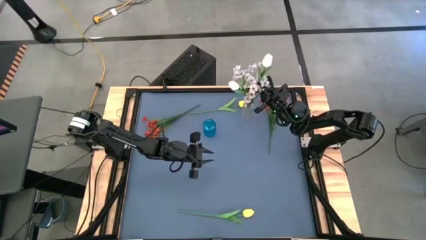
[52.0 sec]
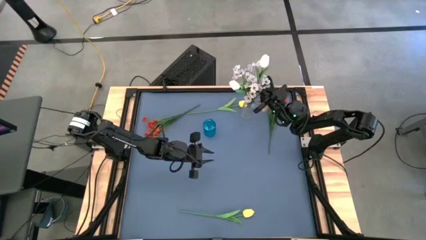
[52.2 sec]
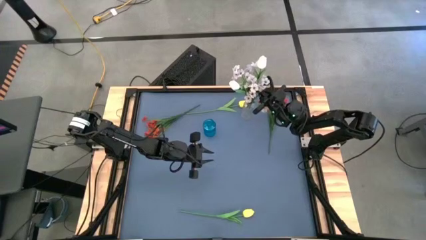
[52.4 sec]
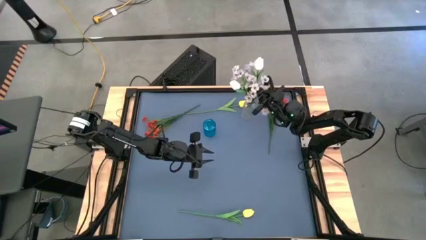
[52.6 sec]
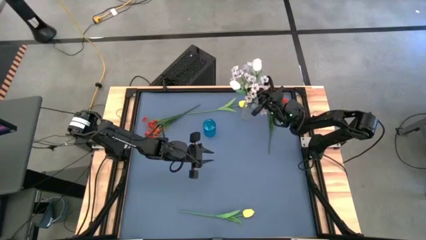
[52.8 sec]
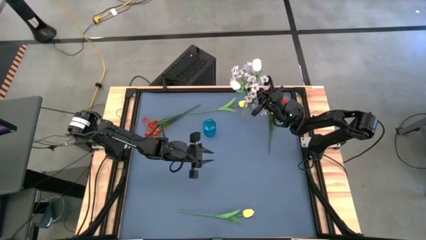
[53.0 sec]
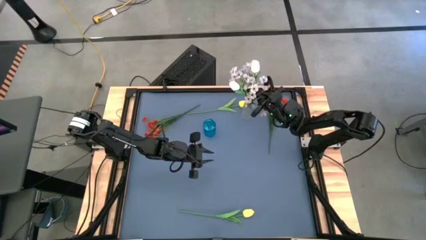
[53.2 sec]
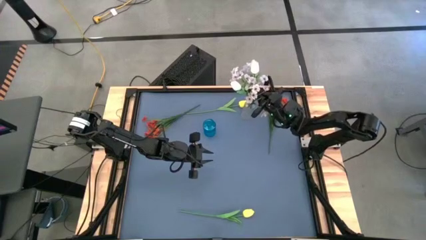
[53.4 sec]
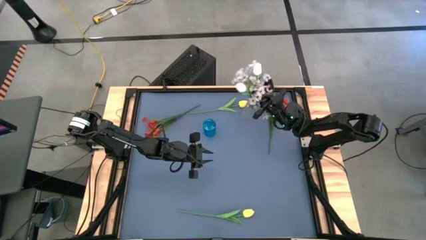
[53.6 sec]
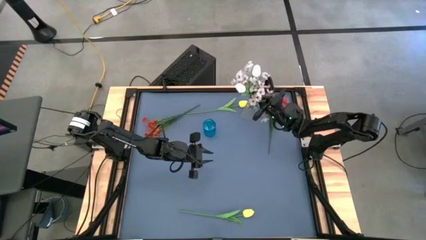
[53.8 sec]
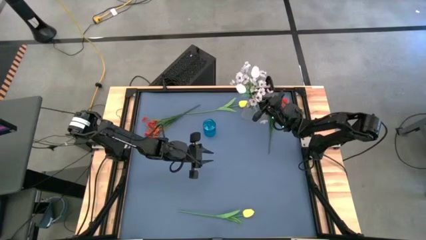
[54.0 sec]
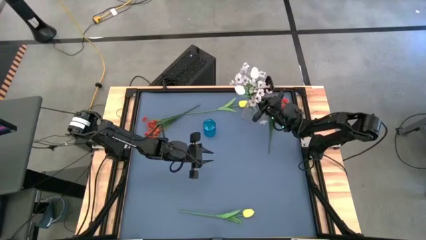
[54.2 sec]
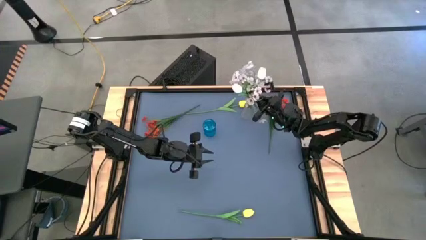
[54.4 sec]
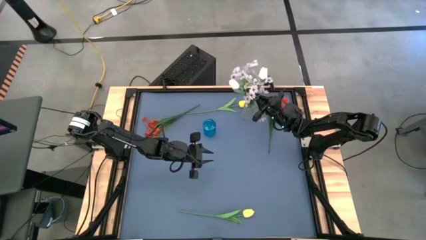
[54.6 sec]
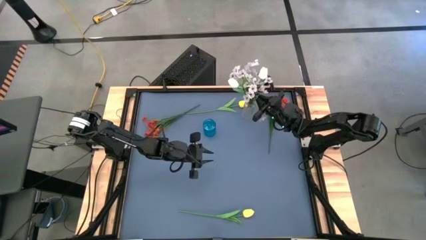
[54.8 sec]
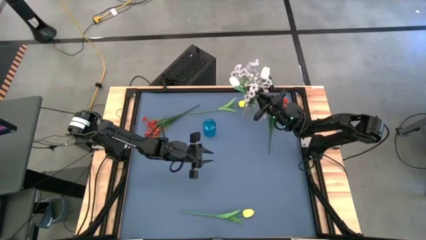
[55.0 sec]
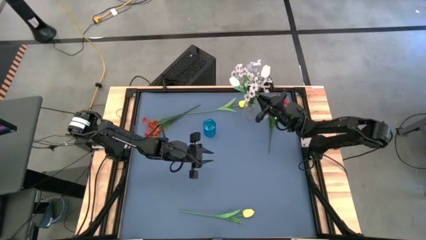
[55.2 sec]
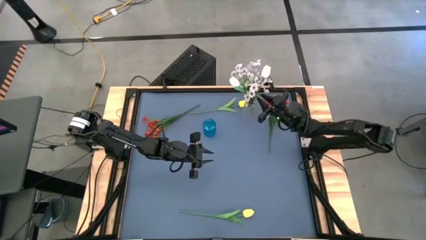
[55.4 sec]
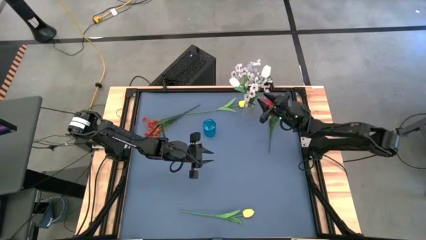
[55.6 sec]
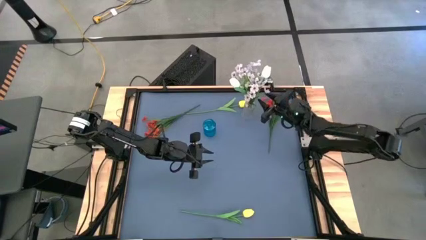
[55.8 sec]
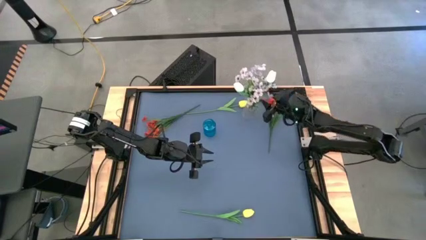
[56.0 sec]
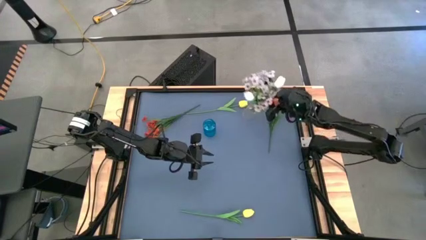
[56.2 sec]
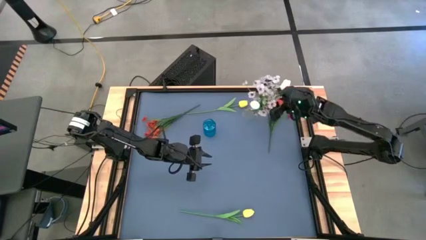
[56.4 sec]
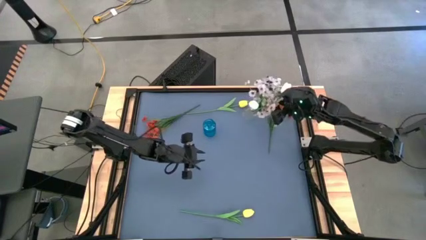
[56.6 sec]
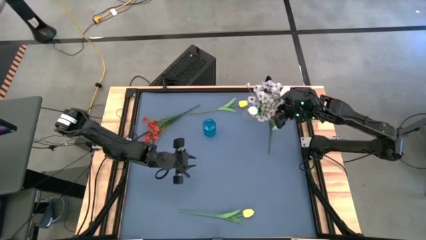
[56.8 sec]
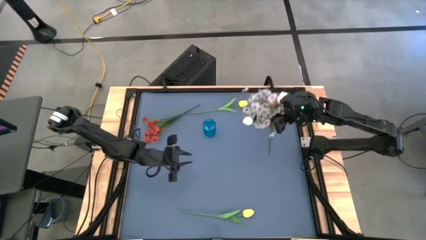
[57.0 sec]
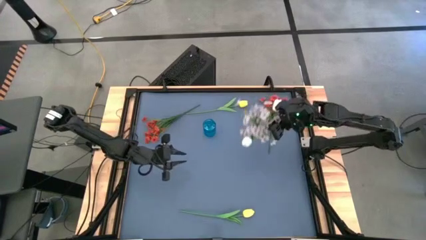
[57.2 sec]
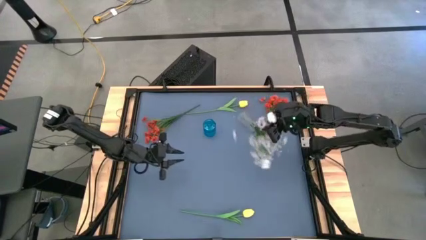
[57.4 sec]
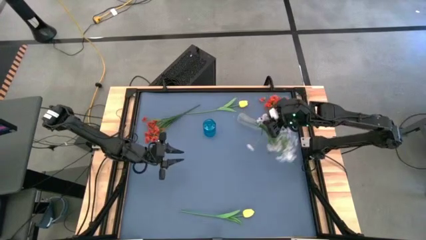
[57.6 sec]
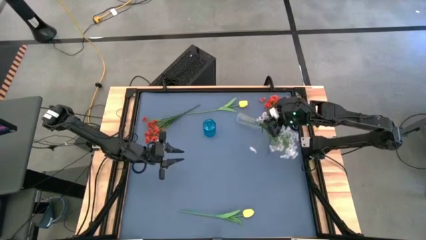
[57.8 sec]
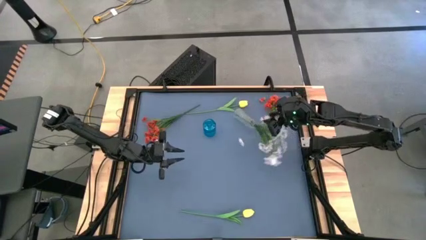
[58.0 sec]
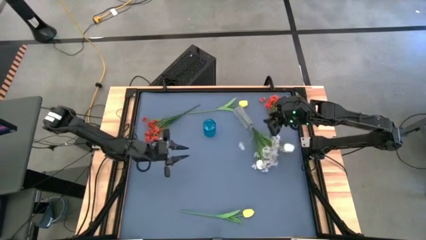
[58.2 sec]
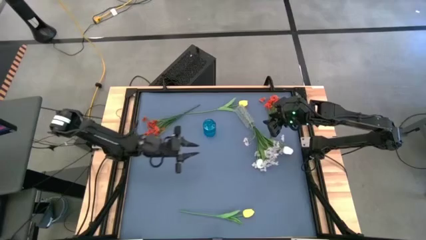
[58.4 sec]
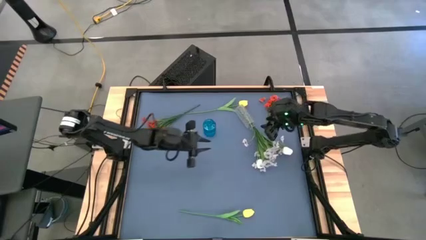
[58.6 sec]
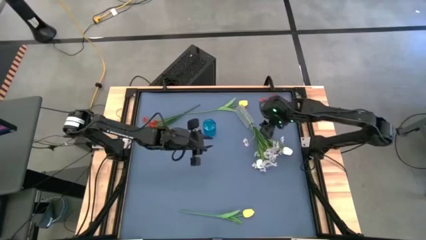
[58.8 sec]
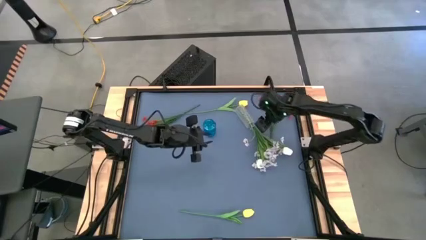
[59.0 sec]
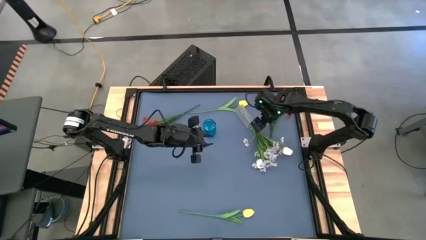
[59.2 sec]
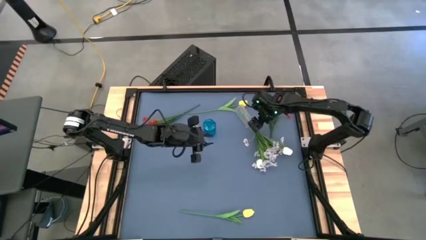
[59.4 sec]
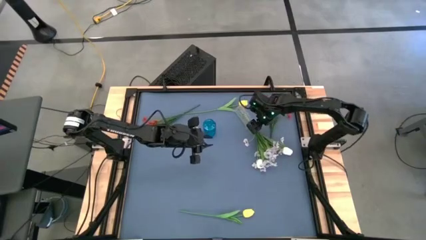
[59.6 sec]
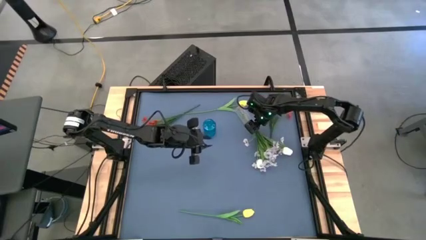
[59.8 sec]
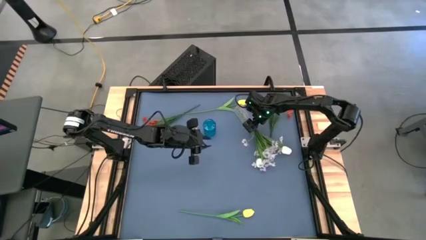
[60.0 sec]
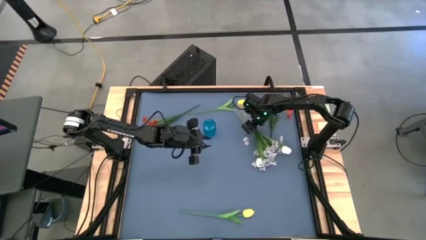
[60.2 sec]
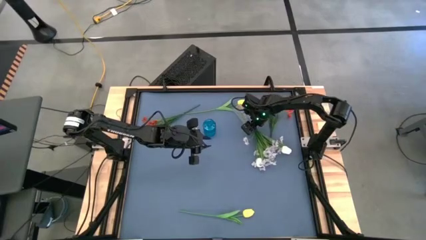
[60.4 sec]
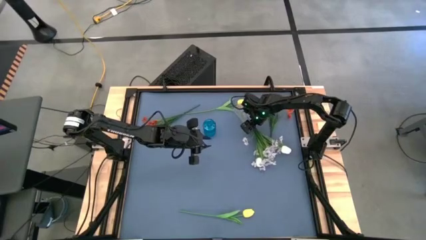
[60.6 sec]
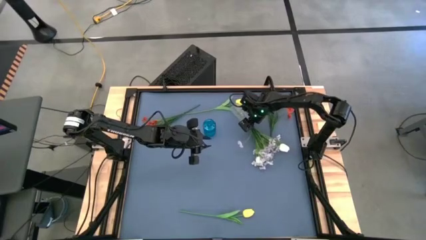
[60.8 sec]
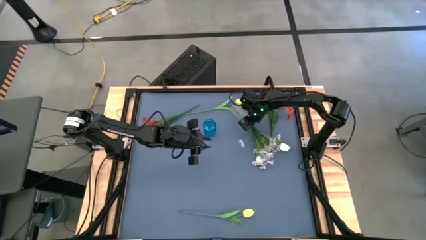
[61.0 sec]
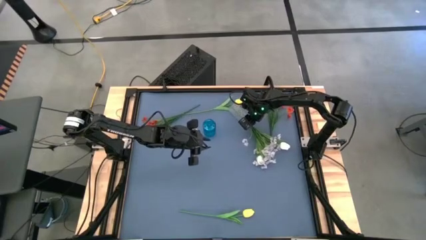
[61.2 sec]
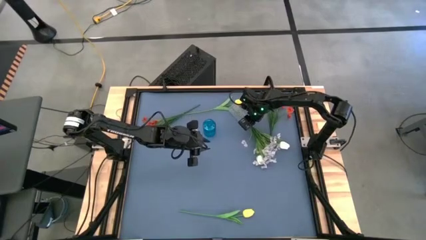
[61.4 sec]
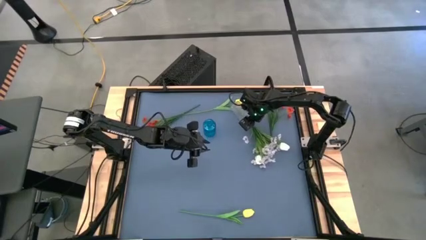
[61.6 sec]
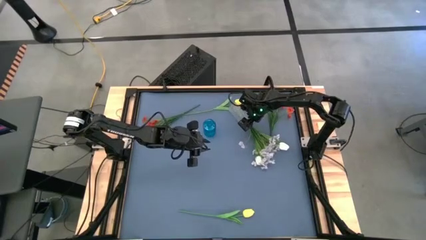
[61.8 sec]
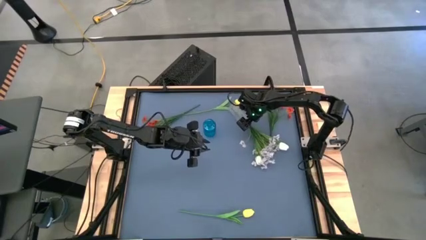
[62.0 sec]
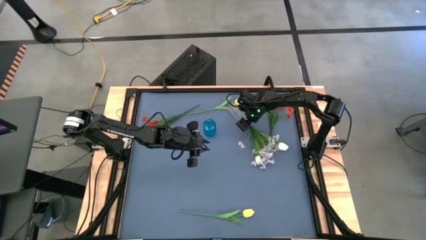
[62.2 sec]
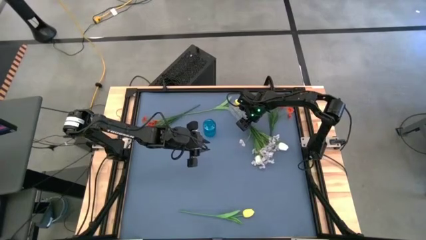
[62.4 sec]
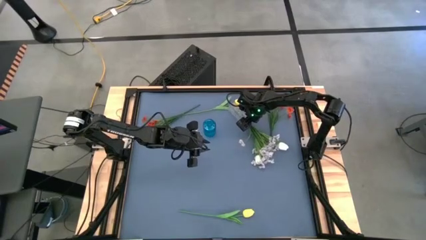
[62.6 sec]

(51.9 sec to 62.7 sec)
Task: Sort flowers into vase by color
Put the white tulip into the transparent vase

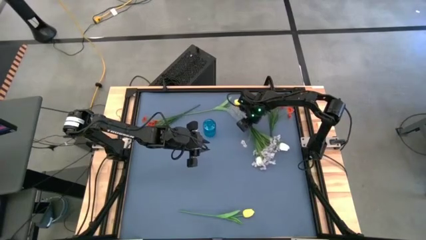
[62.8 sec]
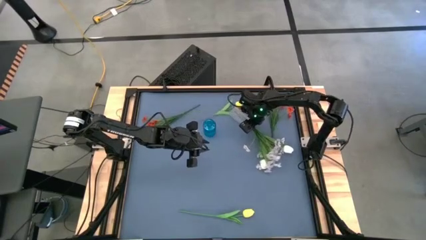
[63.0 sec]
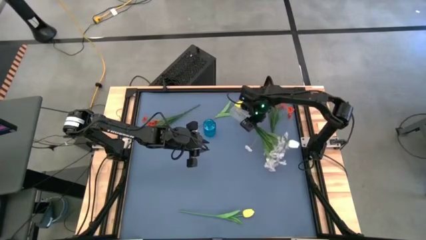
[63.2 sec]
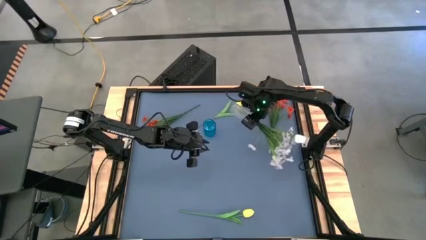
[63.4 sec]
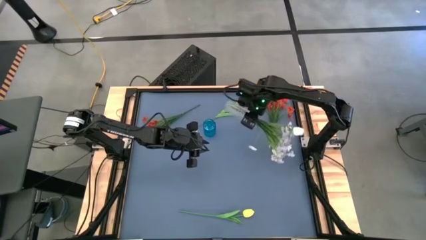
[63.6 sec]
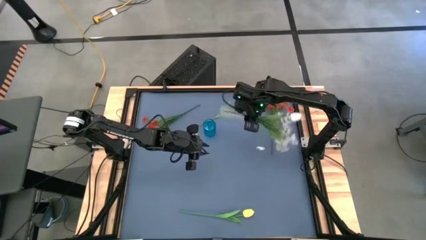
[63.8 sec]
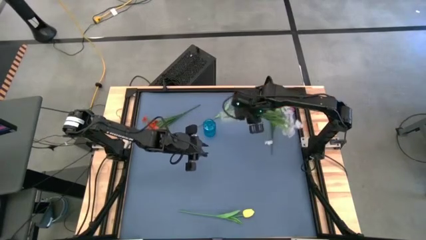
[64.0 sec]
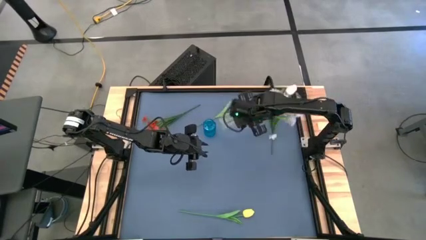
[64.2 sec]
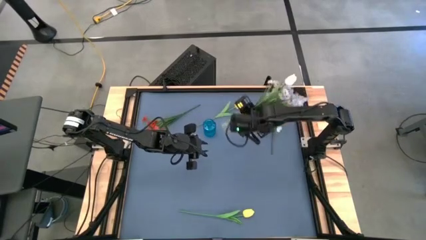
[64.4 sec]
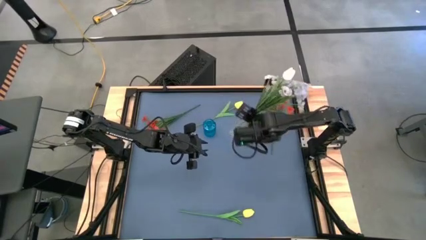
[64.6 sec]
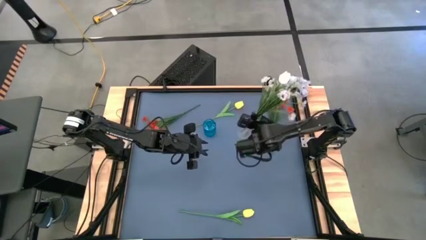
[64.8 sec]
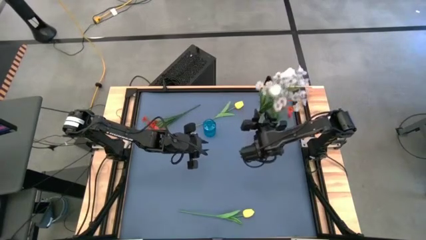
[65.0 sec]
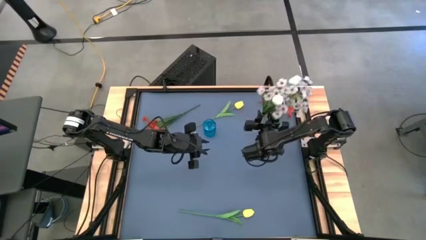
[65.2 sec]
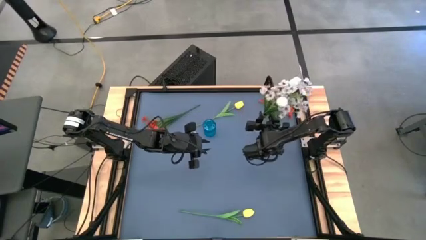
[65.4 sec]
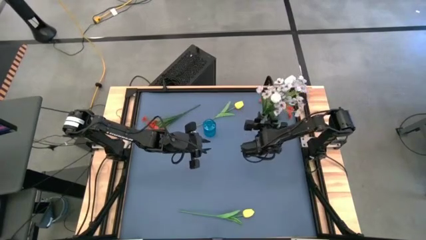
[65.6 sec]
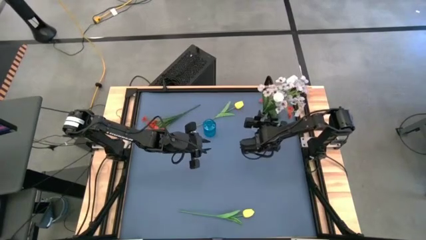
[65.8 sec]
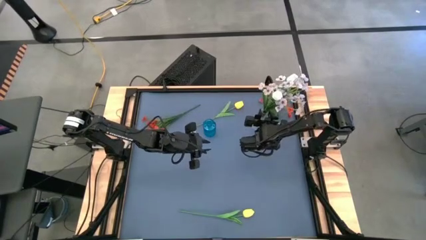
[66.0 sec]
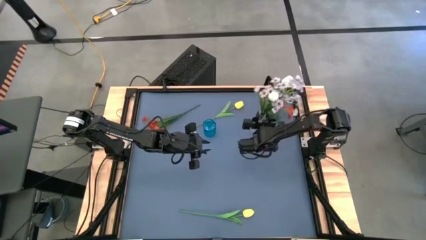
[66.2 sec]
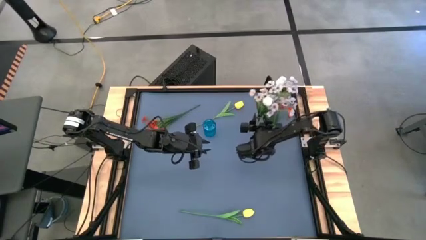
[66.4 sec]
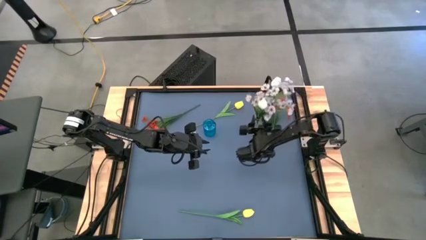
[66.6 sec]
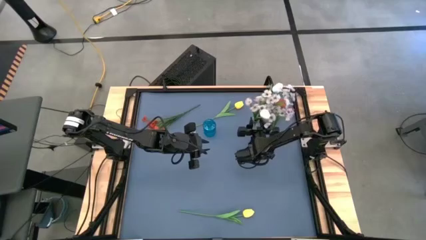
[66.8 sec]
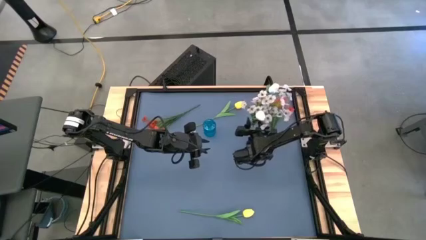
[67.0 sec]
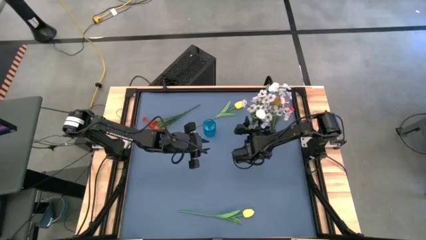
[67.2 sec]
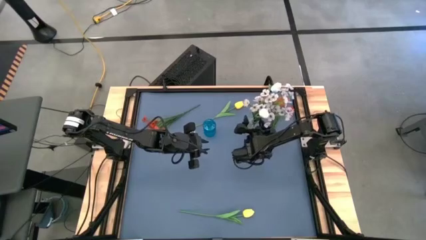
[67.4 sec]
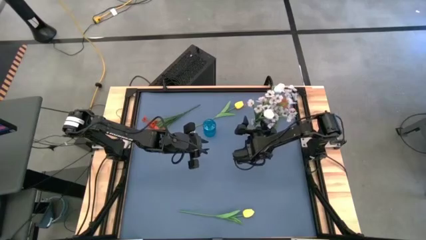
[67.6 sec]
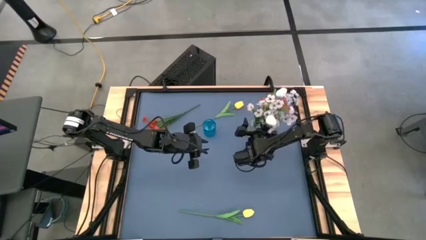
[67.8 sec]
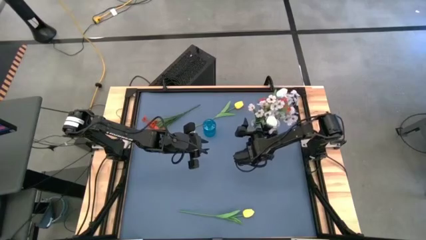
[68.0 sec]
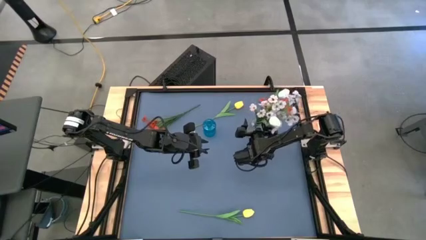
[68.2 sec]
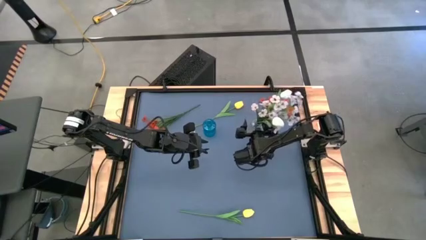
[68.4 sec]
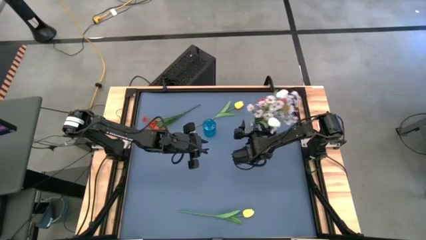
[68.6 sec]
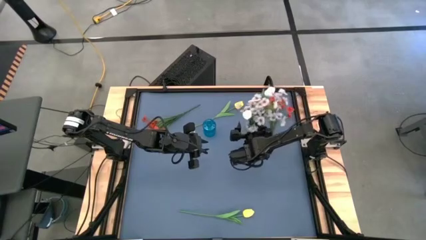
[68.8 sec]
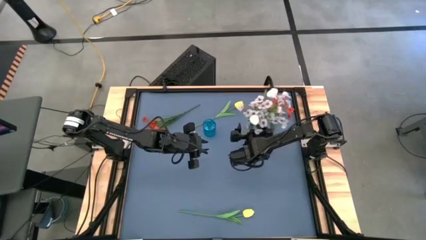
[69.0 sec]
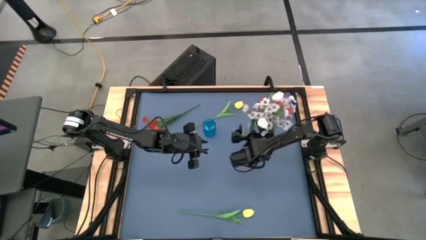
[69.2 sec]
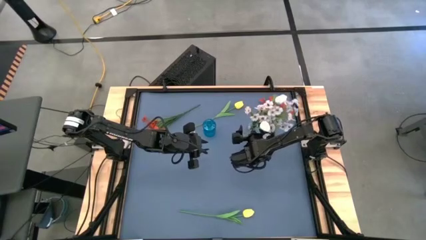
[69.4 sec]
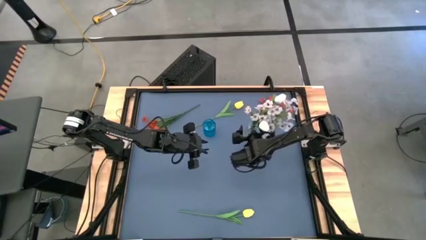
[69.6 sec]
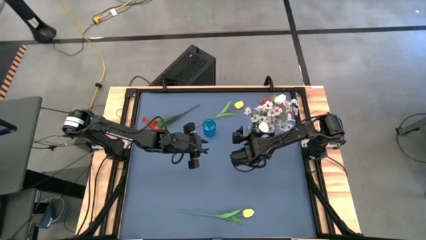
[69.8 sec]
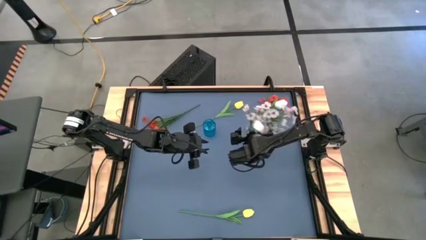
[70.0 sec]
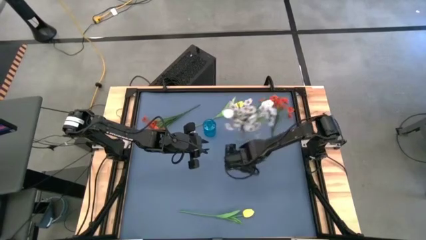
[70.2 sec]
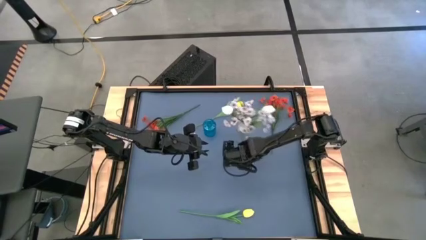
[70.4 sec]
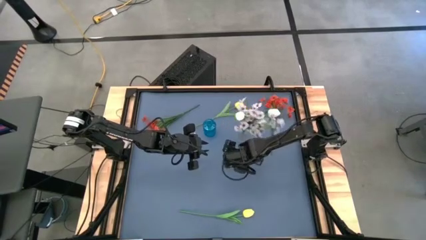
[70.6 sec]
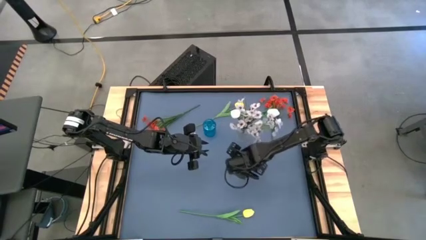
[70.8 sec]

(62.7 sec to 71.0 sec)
Put the white tulip into the transparent vase
